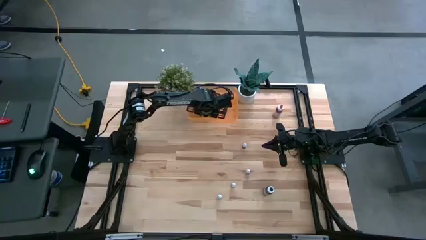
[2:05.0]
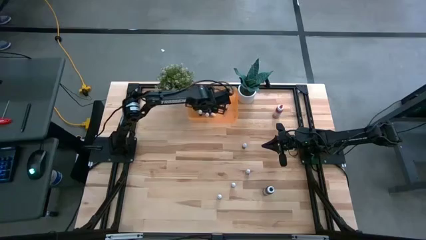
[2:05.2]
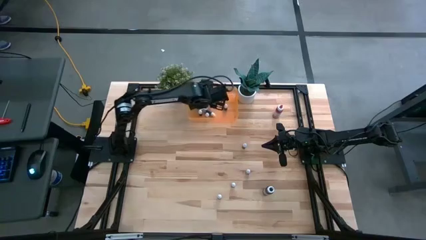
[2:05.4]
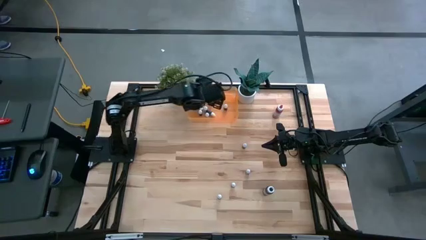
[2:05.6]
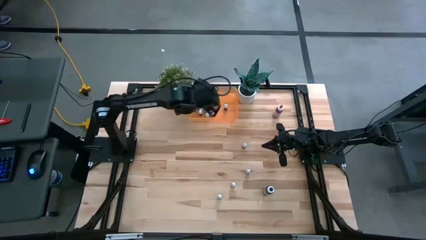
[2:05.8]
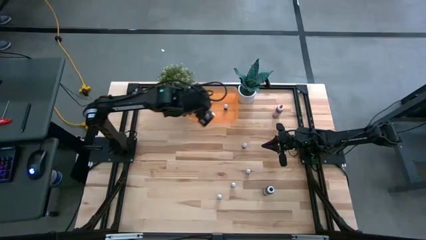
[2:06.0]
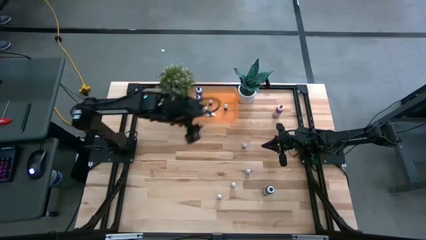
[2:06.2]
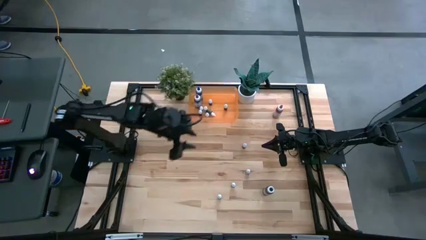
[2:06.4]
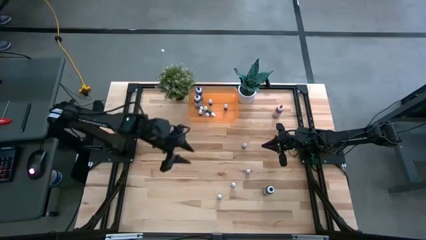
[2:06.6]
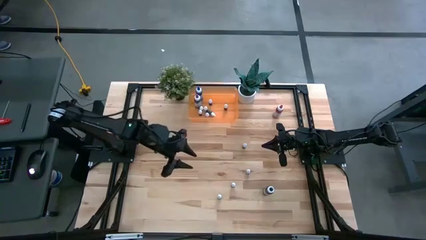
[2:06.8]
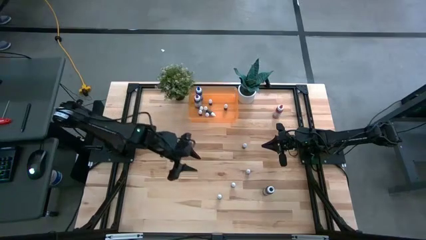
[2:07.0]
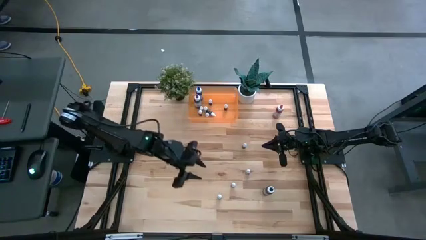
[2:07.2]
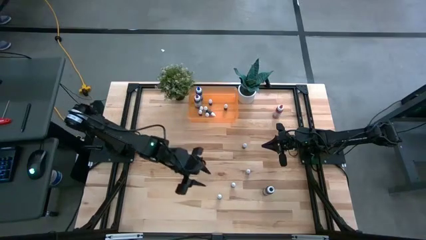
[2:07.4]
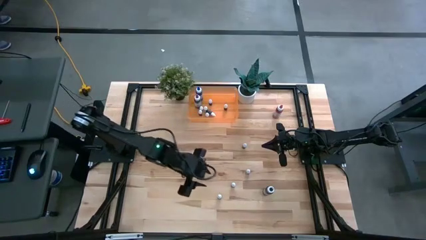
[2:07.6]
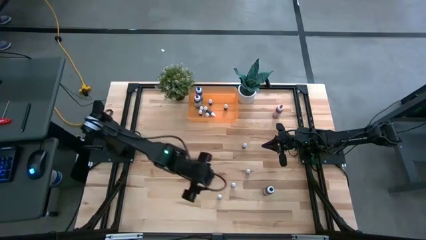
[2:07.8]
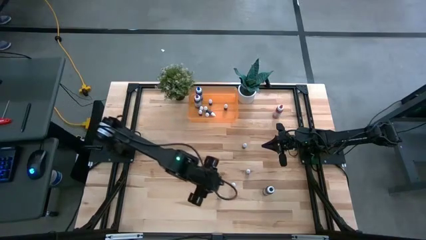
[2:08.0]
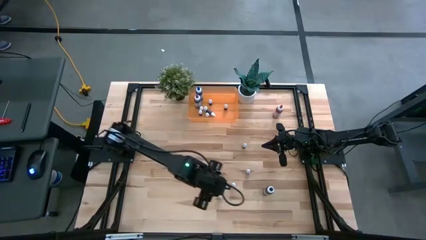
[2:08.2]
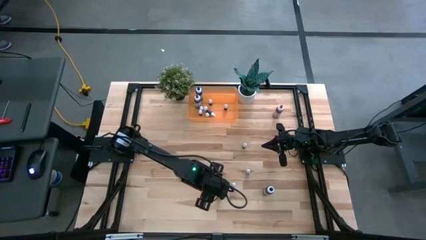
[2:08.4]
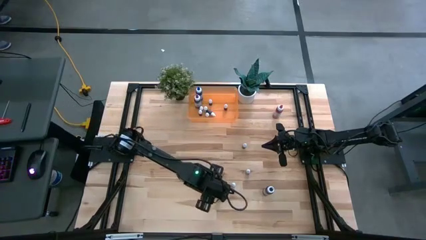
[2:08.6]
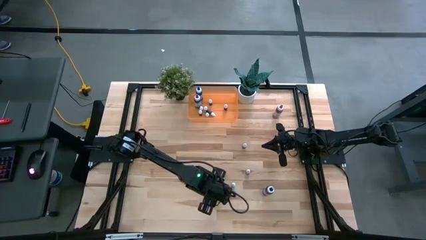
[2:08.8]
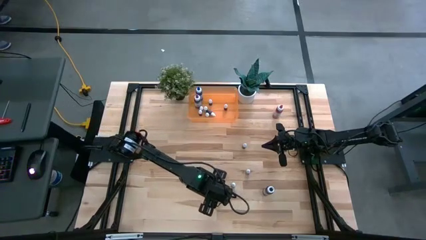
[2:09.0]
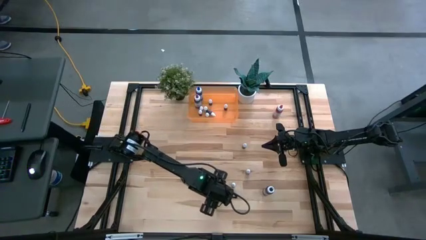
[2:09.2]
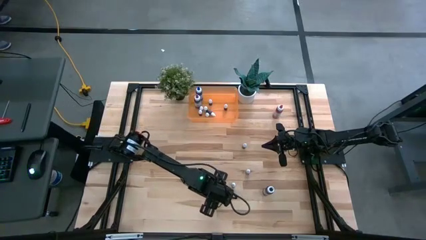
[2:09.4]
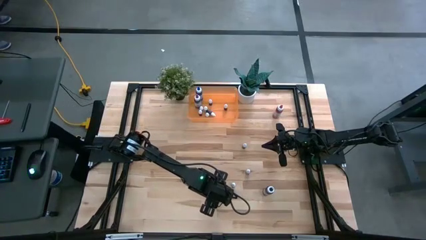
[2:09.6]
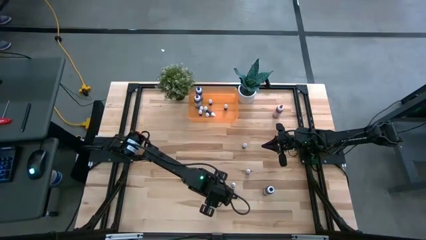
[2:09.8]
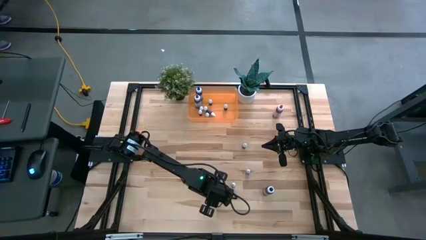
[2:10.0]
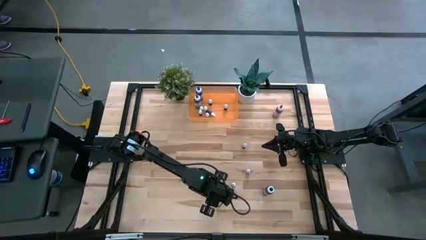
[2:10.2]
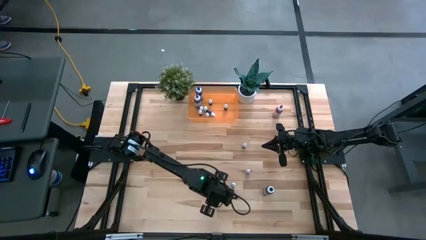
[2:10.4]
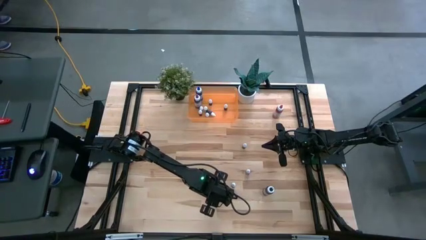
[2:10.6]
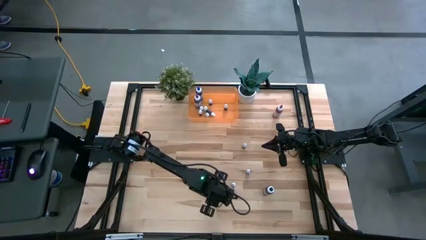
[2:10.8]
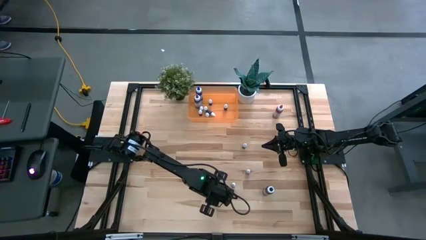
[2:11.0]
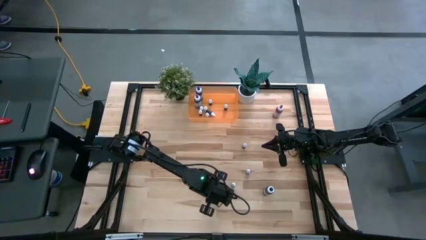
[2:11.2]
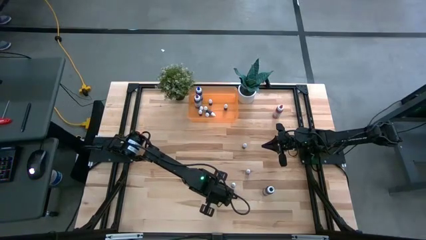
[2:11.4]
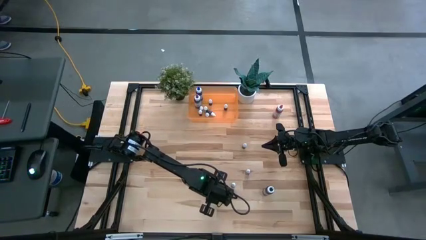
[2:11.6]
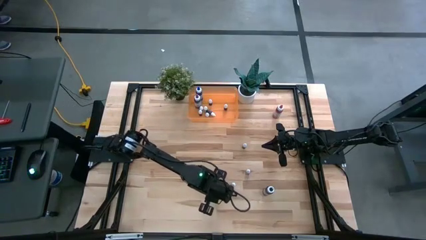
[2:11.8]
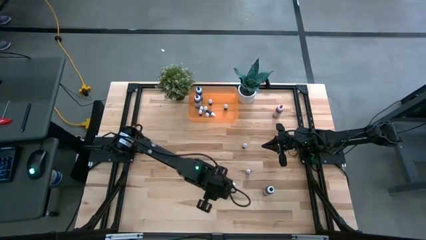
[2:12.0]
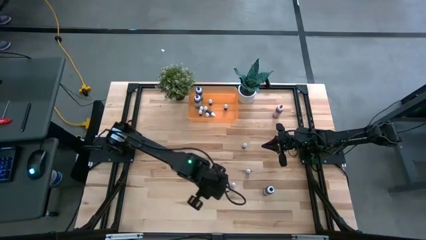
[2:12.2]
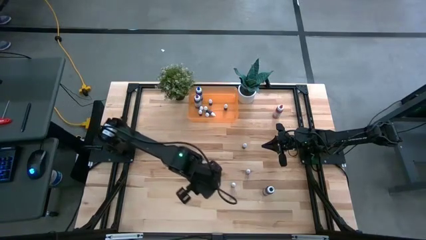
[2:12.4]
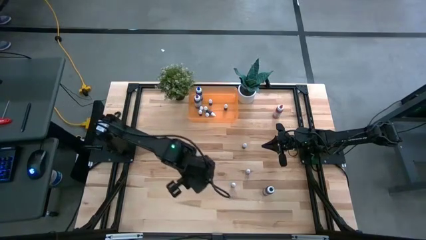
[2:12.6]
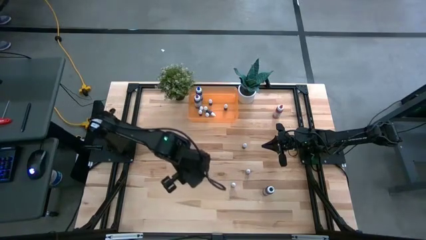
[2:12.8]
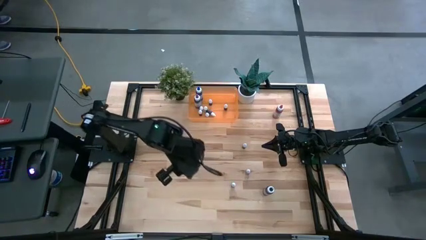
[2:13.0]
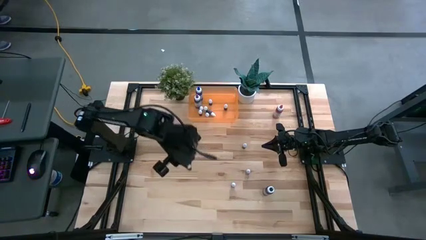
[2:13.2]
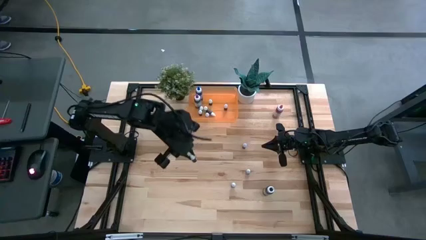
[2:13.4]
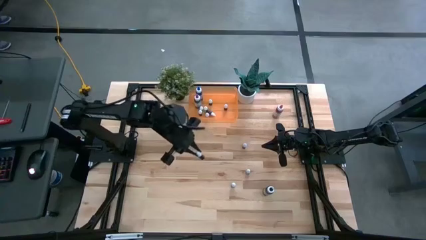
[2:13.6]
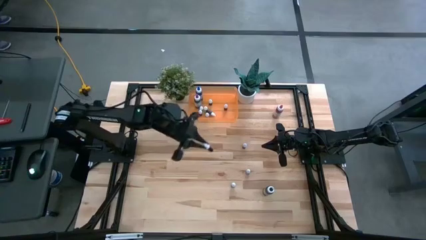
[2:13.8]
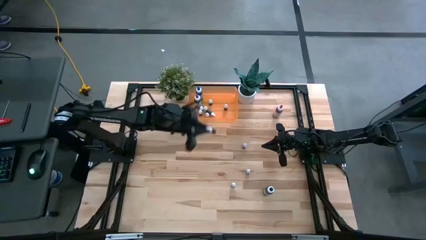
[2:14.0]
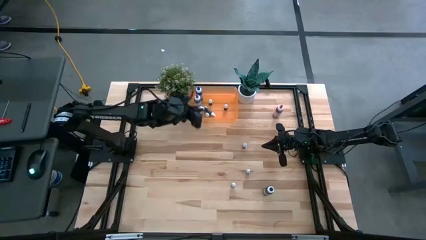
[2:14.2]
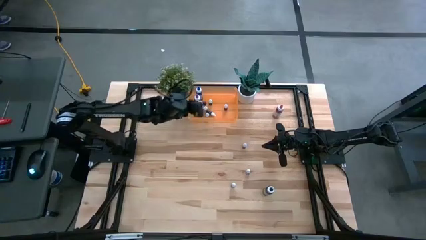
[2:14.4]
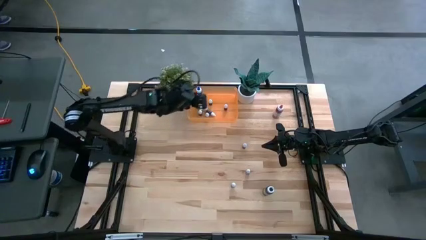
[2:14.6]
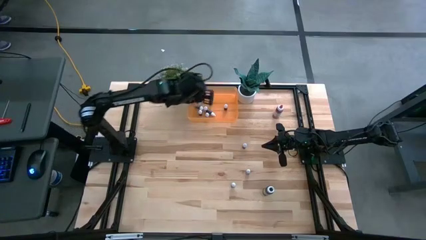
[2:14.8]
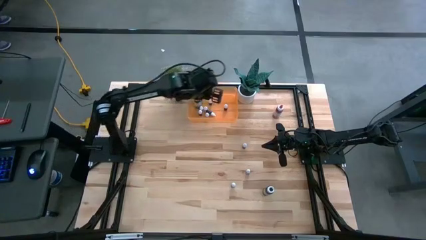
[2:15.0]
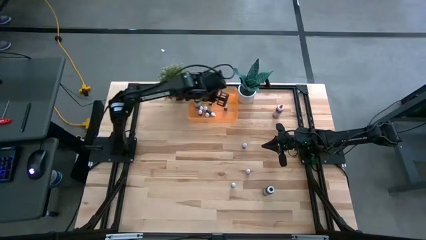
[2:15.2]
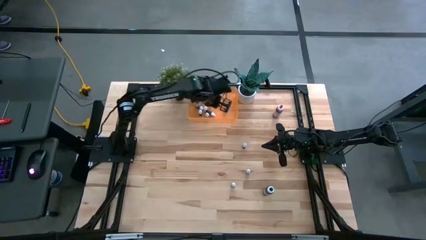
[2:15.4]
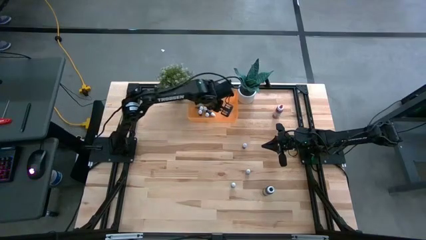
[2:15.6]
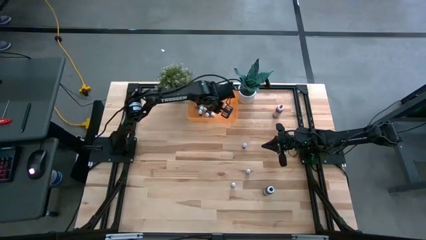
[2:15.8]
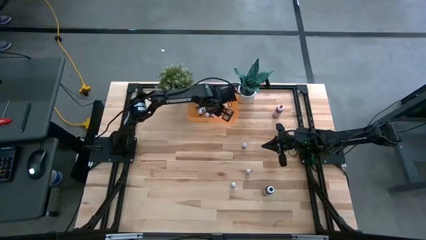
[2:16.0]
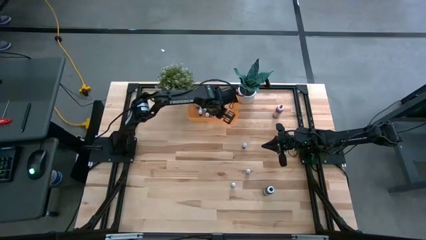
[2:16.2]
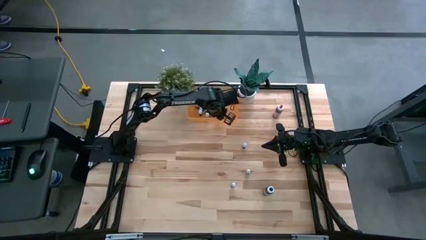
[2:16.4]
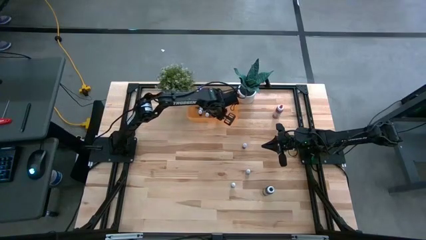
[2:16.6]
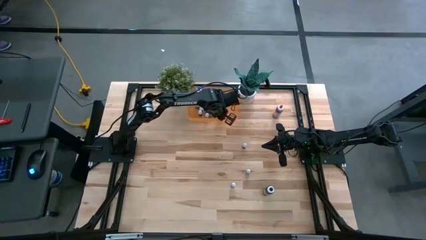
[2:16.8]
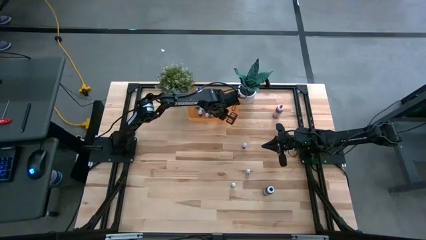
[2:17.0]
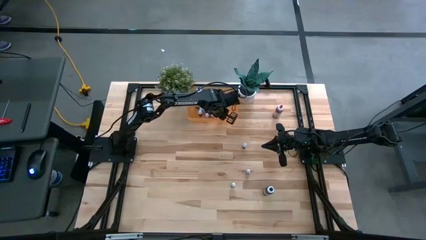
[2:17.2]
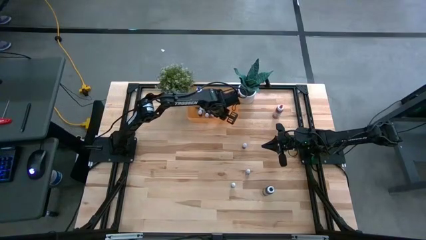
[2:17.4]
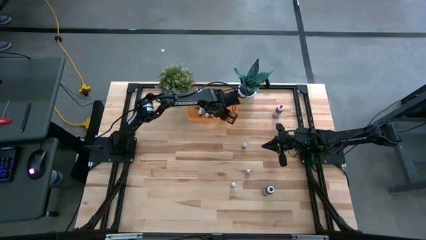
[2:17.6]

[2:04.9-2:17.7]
Task: Pick & Place food coloring
Put the small red bottle into the bin

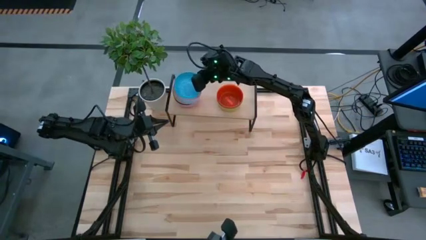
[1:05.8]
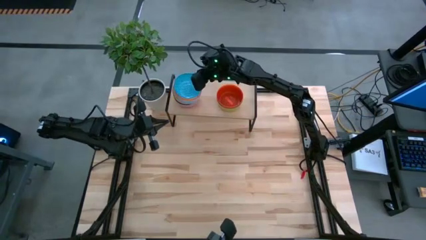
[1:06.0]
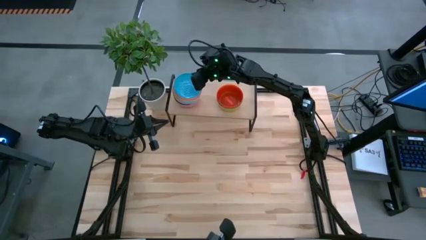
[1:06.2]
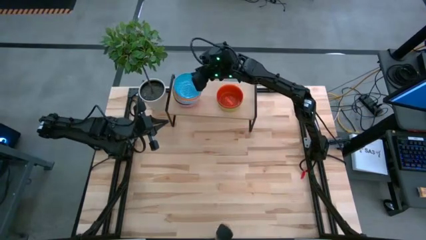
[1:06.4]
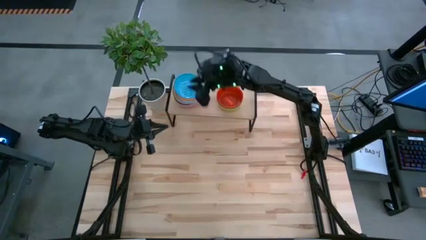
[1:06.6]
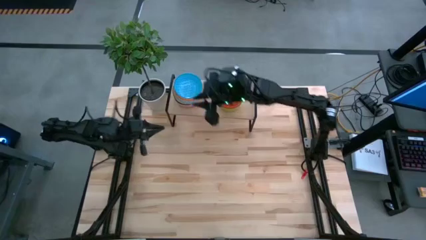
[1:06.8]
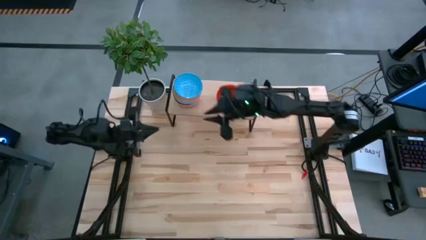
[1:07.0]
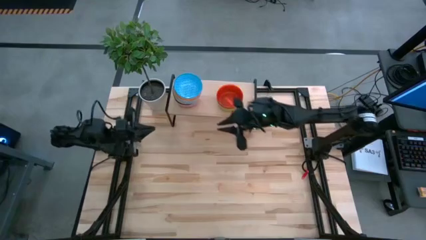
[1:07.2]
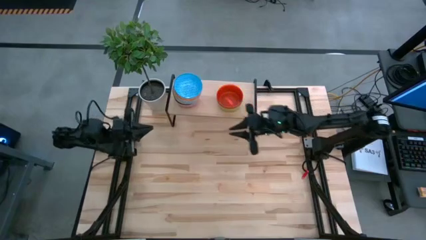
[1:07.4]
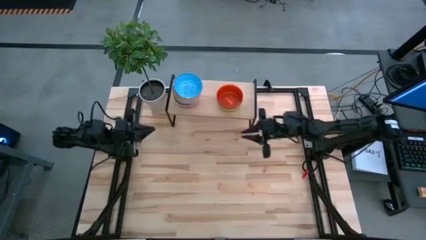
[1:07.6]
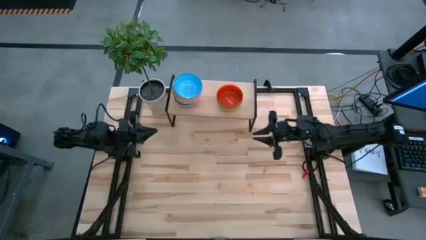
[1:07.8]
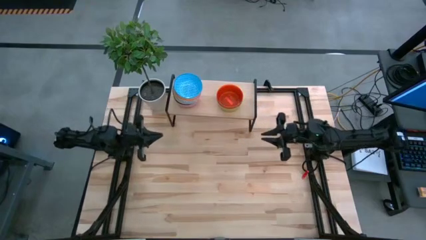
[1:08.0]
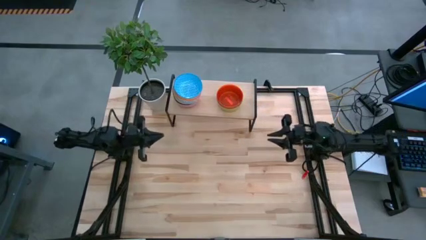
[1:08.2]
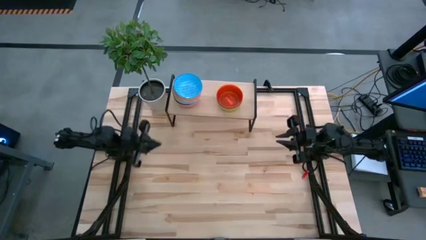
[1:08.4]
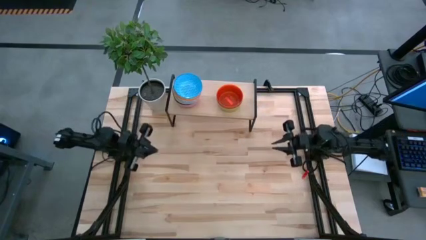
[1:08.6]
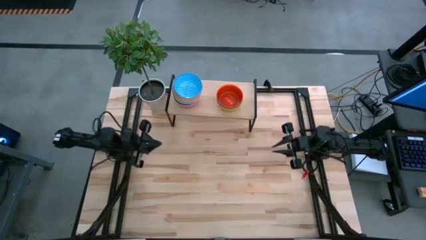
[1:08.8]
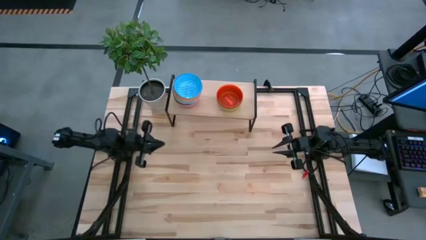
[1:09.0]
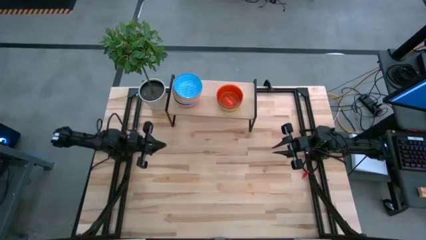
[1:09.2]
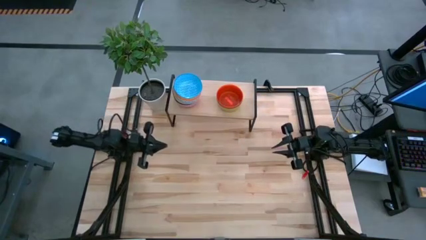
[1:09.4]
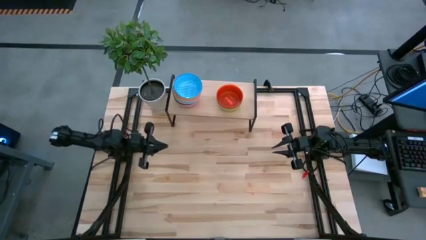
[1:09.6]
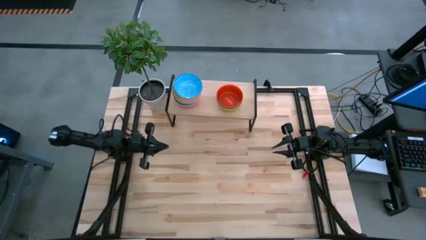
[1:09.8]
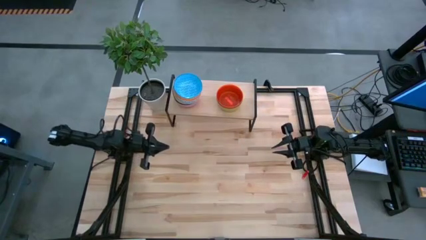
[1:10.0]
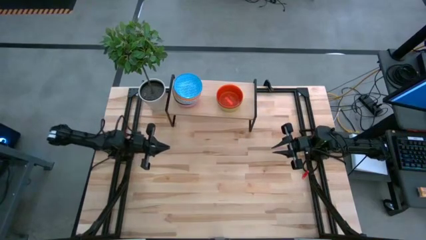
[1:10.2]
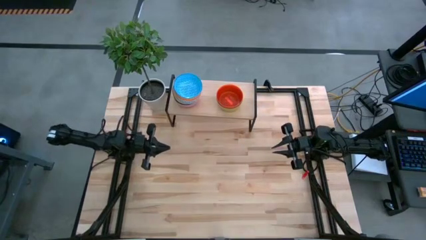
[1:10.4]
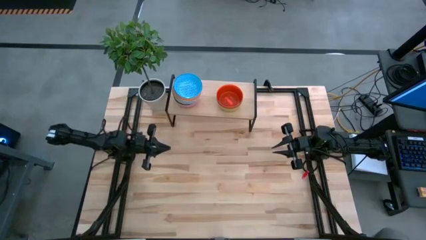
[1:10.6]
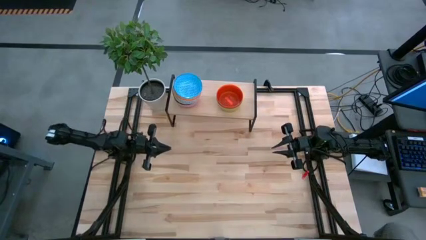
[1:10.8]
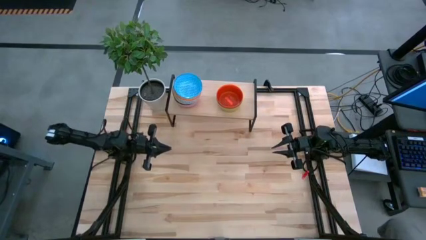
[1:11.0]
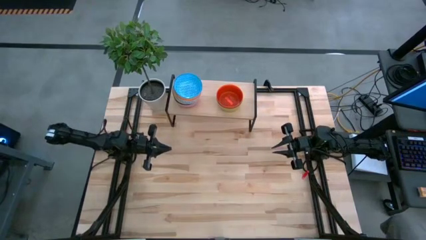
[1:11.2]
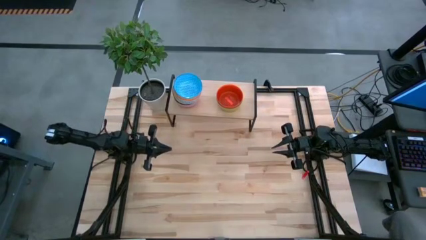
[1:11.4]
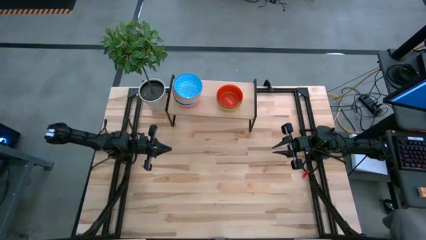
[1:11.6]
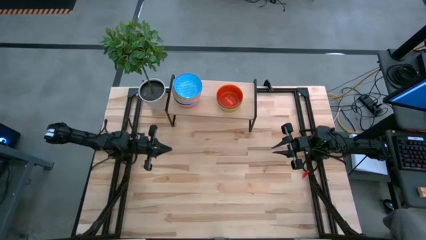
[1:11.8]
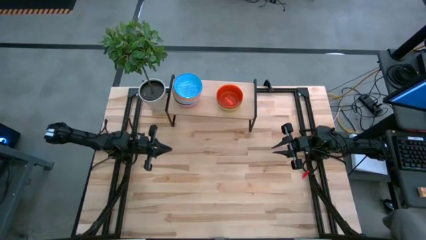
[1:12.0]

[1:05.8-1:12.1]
Task: Place and stack bowls onto a shelf
Return to Home Position
